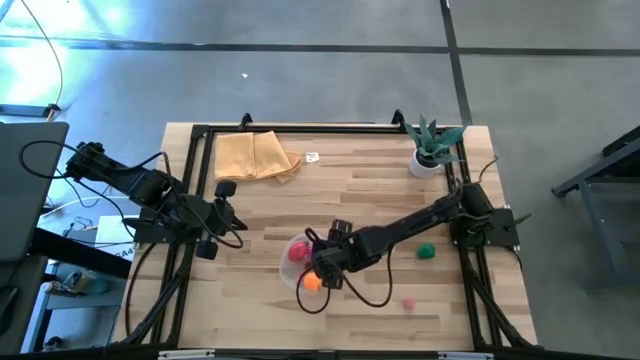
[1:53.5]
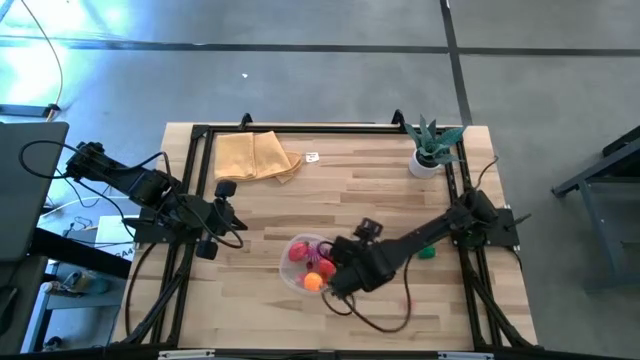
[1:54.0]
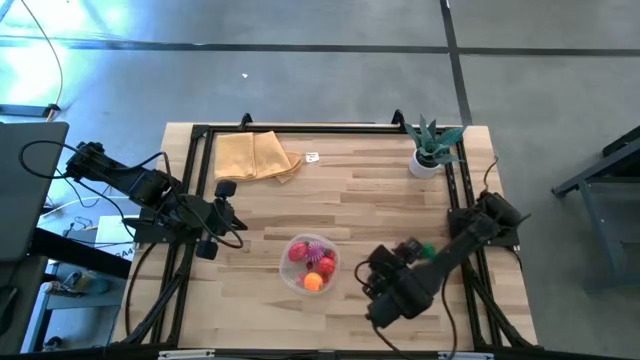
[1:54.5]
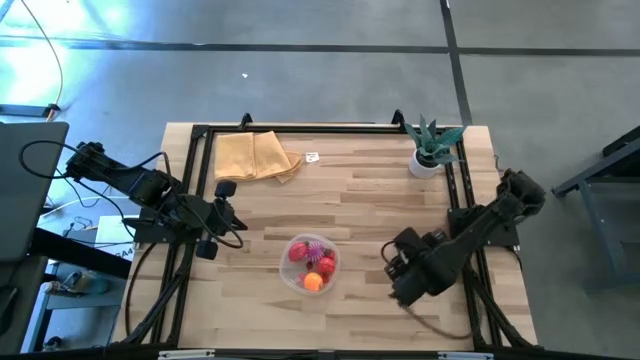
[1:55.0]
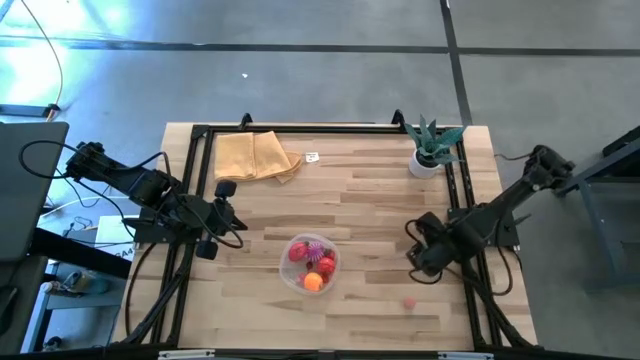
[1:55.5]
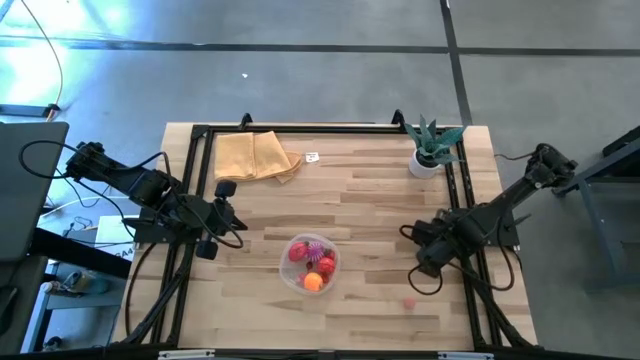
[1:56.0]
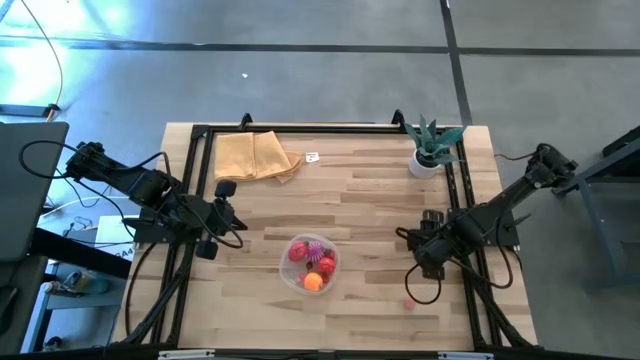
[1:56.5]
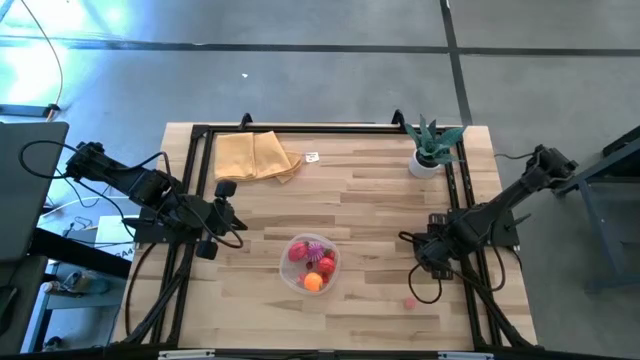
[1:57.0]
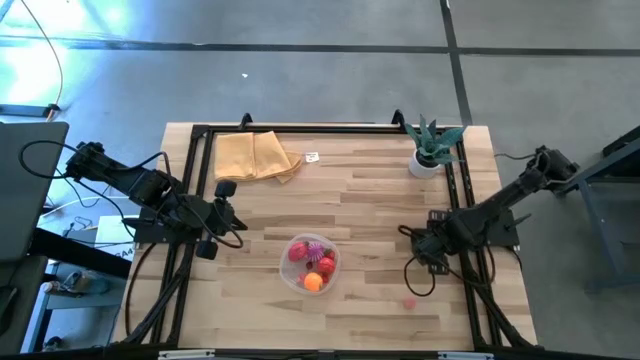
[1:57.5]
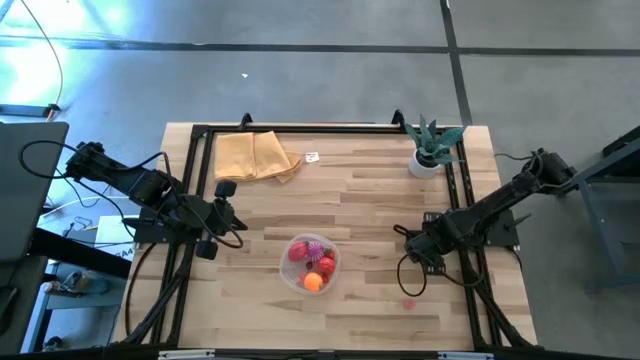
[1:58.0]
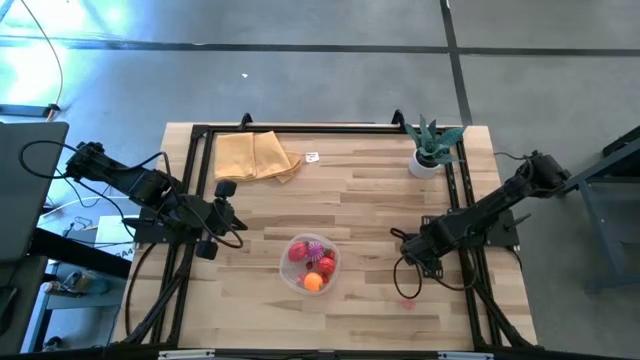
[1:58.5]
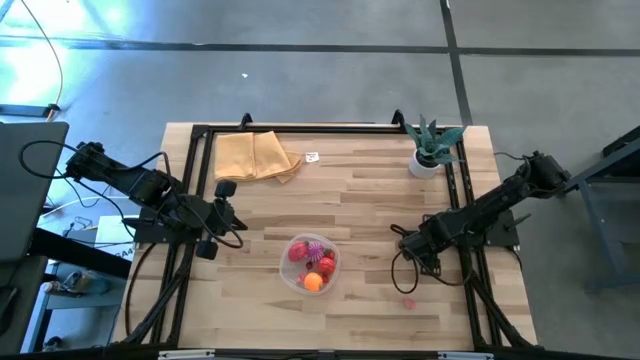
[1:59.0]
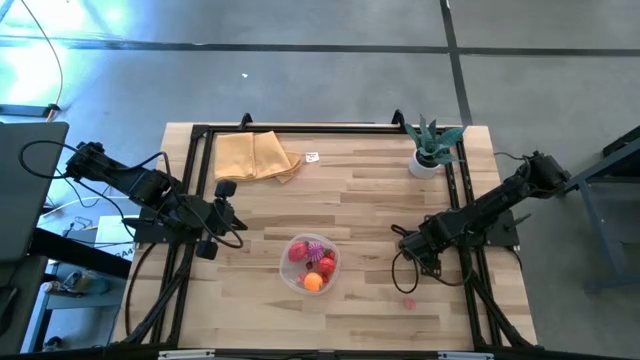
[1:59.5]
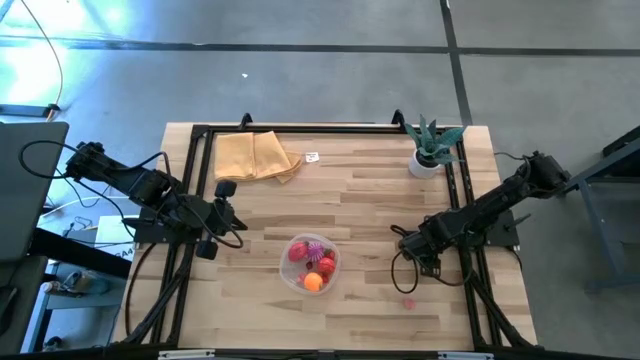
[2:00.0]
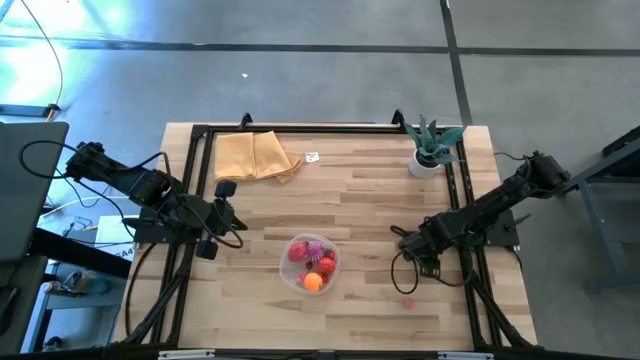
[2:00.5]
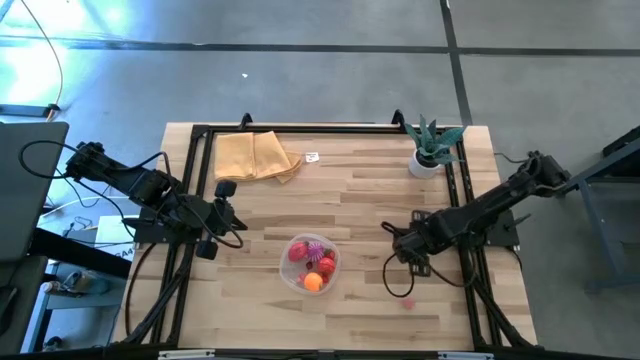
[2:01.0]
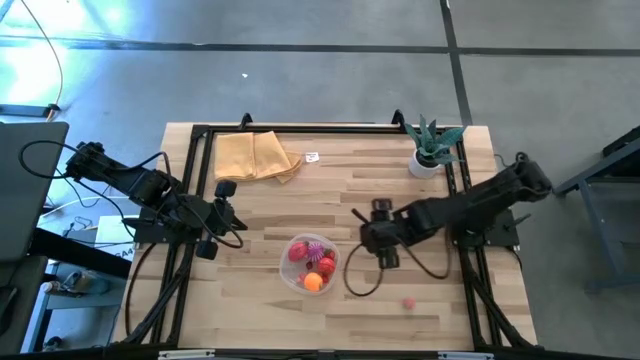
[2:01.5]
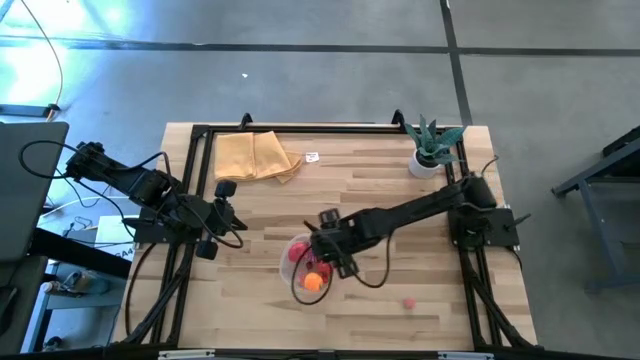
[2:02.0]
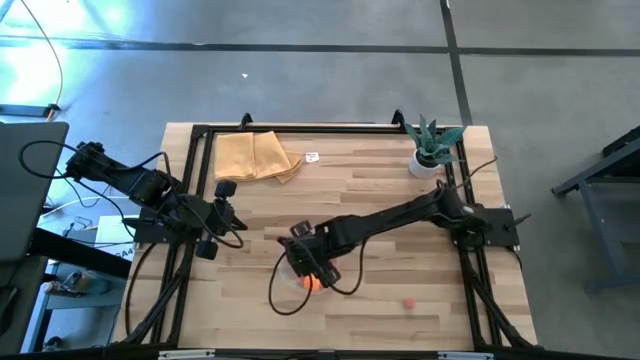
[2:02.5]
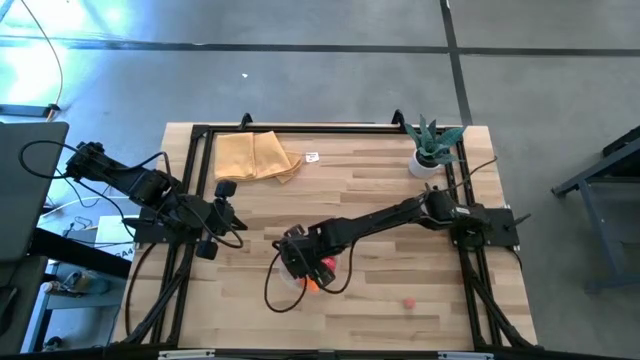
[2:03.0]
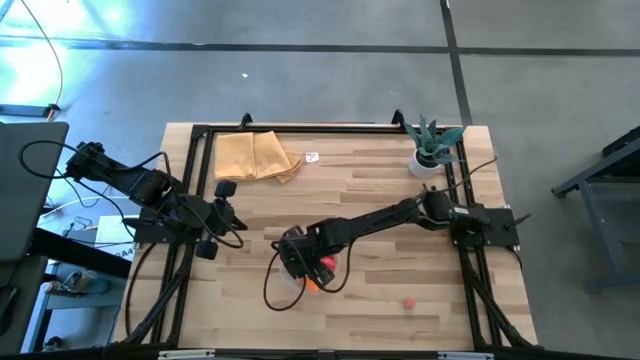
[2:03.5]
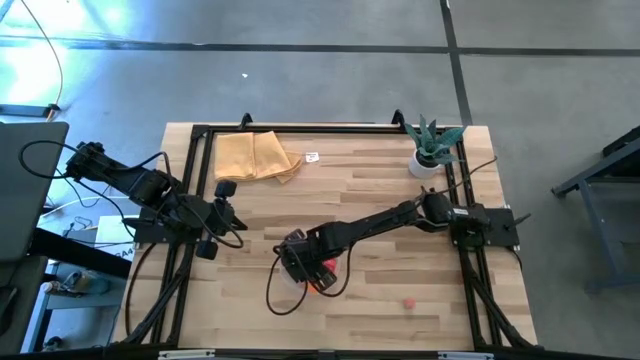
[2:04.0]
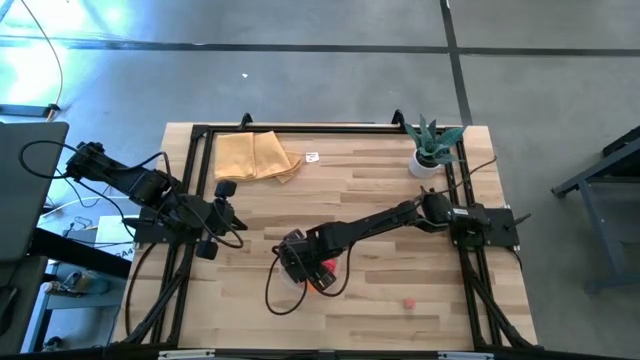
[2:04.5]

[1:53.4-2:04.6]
Task: Pick and placing Produce into tupperware
Put the bell pepper into the bin

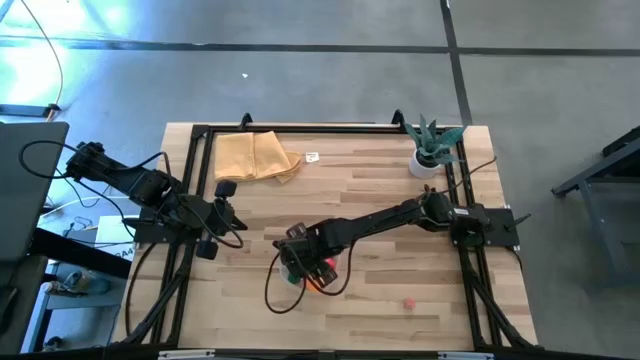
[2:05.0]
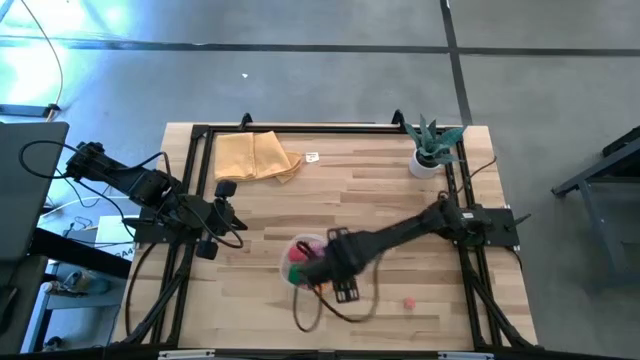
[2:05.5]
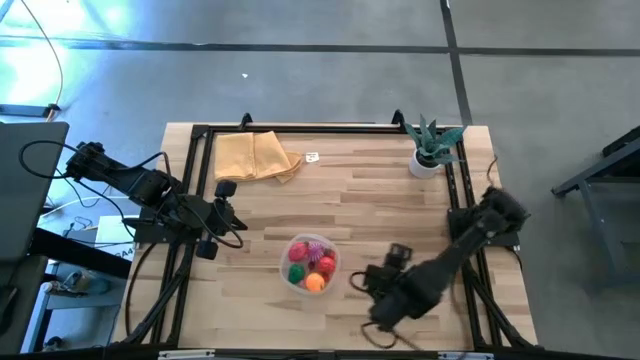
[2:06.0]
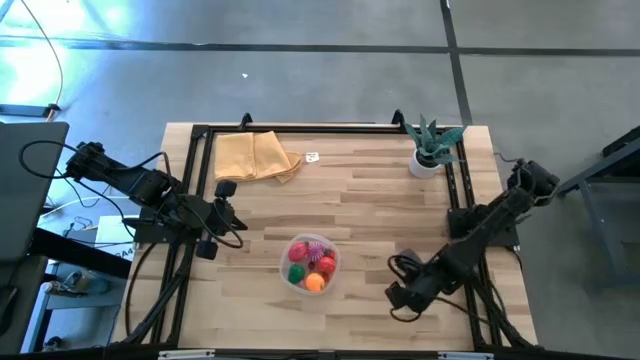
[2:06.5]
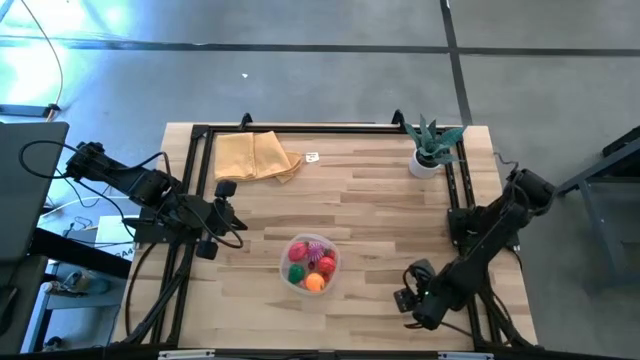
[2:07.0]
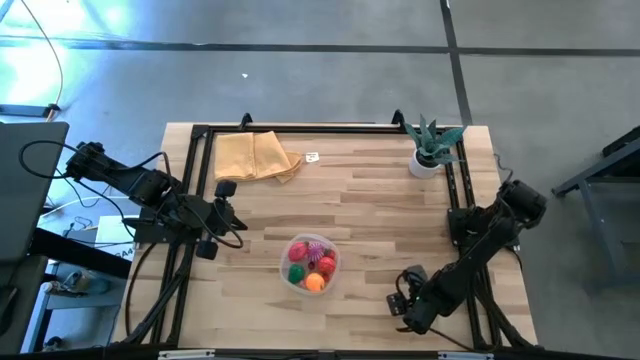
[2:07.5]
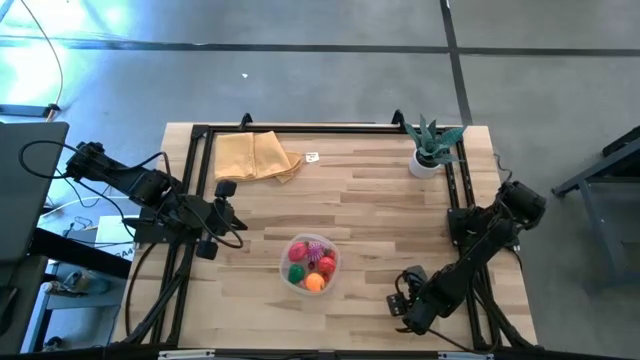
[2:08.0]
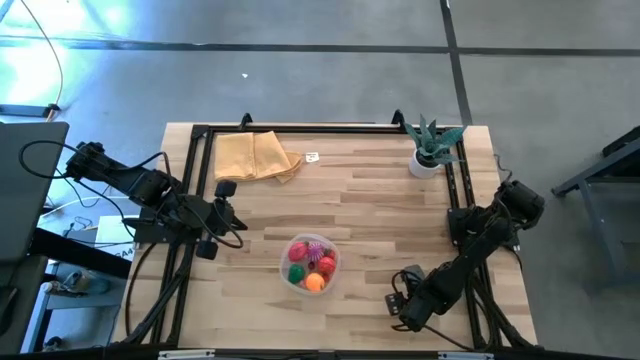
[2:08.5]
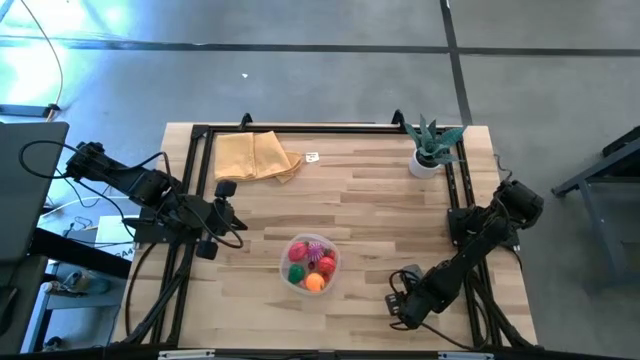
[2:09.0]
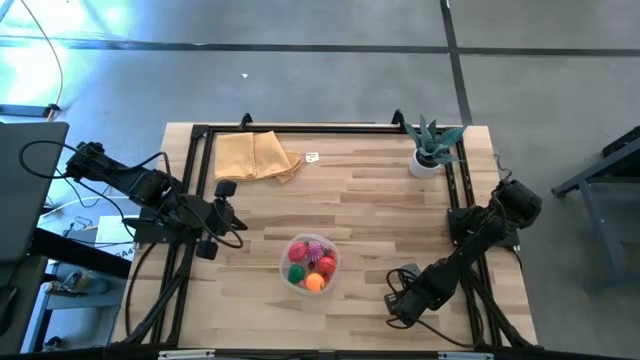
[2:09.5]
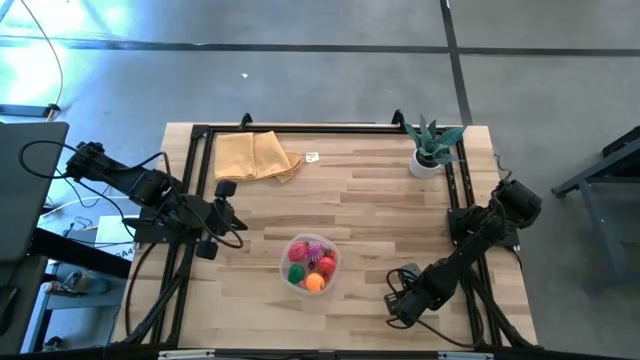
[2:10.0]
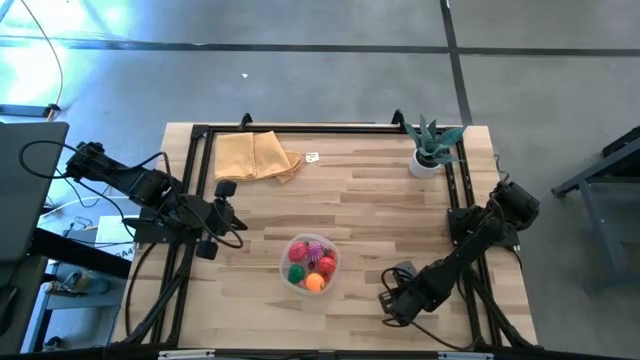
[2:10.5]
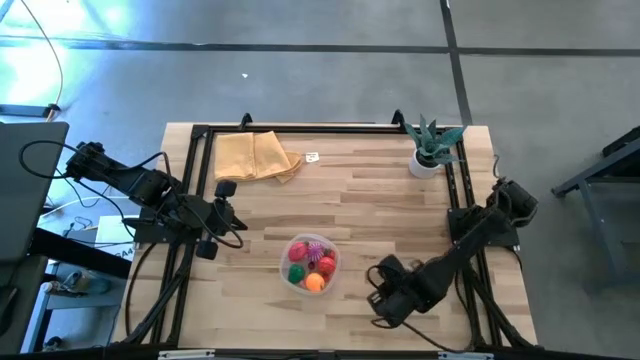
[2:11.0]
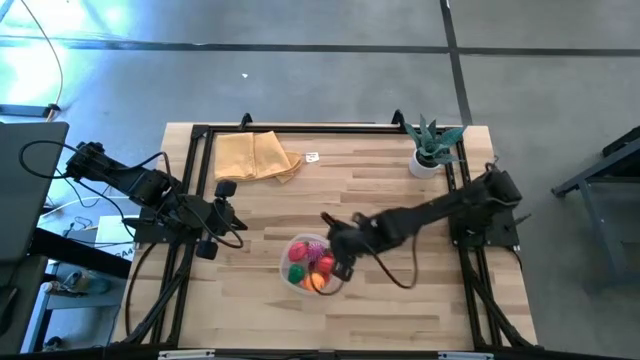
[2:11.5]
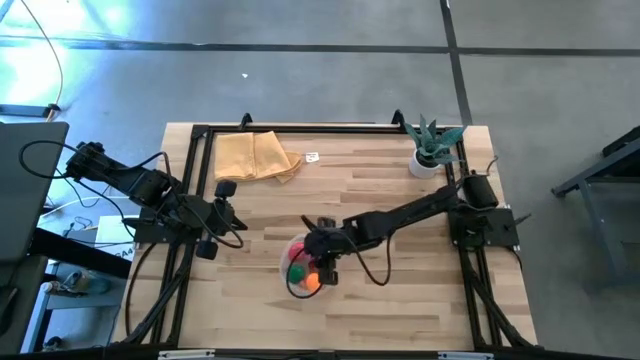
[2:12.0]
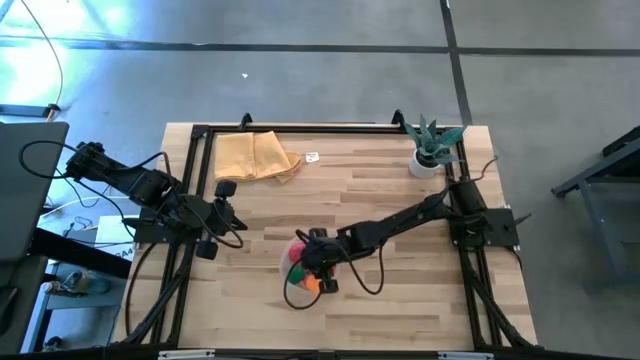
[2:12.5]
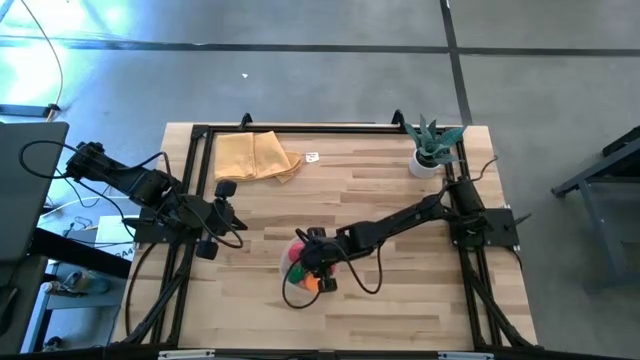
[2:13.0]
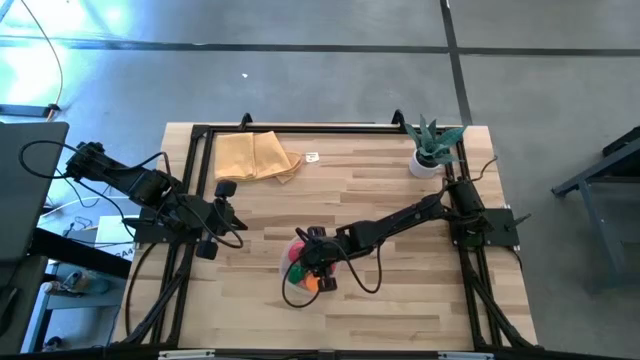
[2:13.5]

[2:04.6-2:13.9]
Put the peach into the bin
